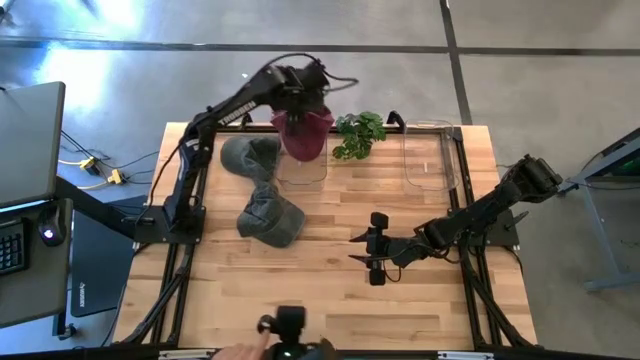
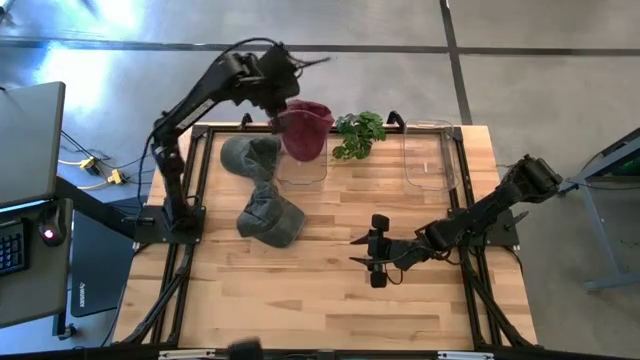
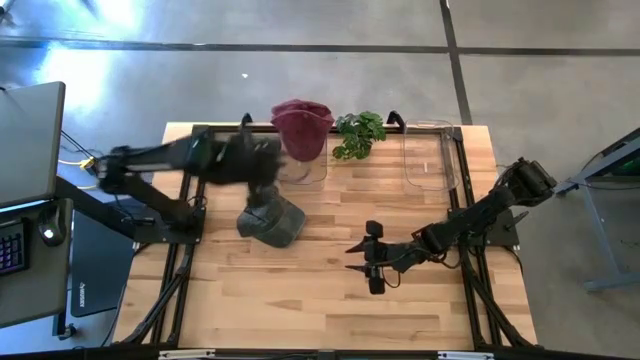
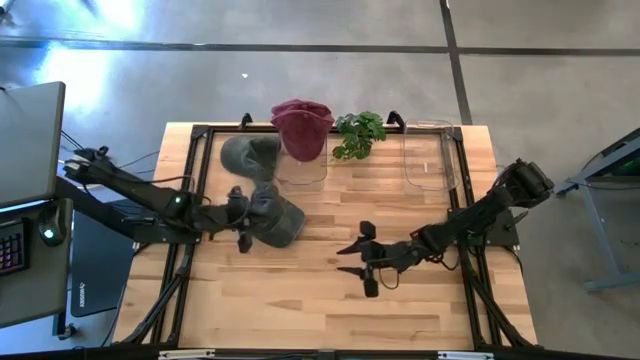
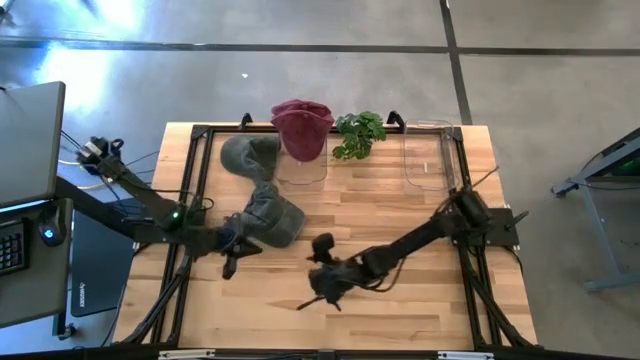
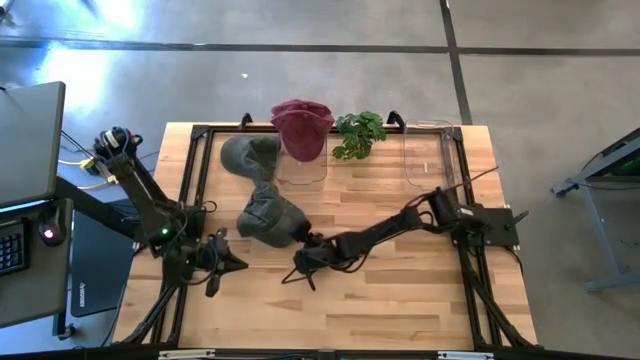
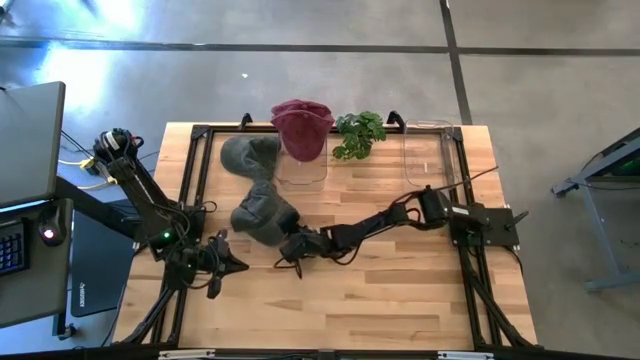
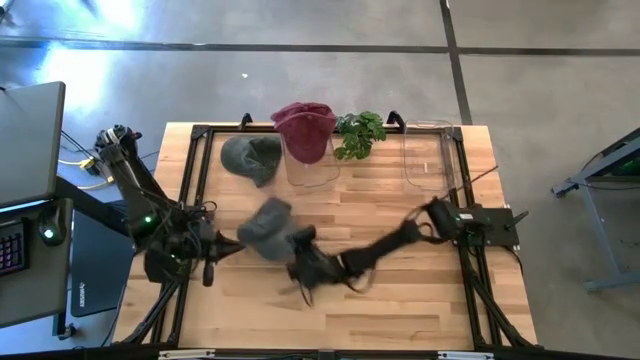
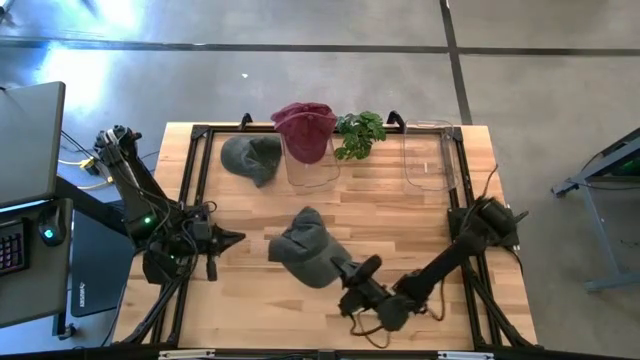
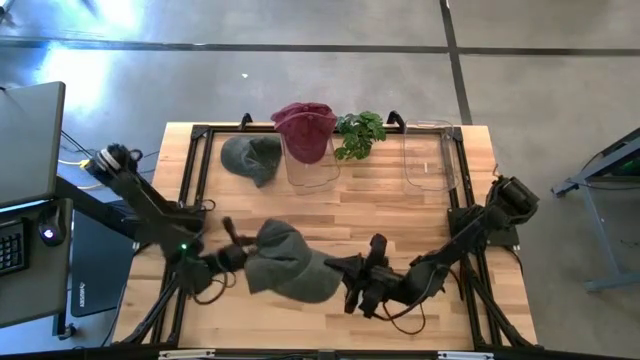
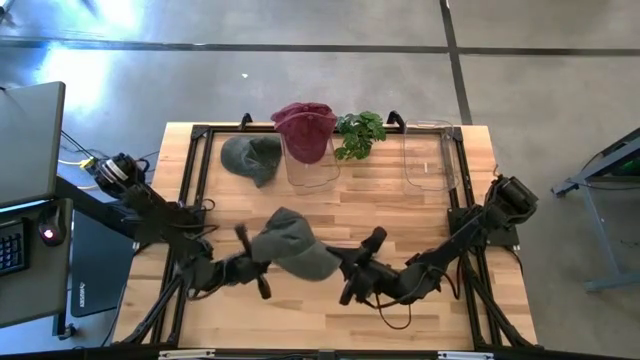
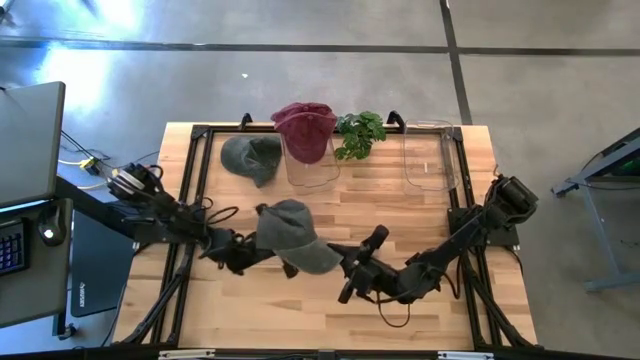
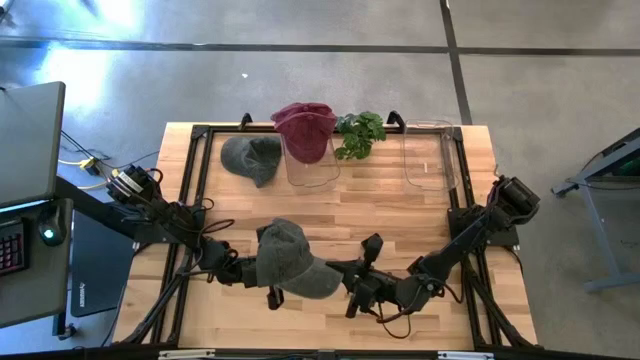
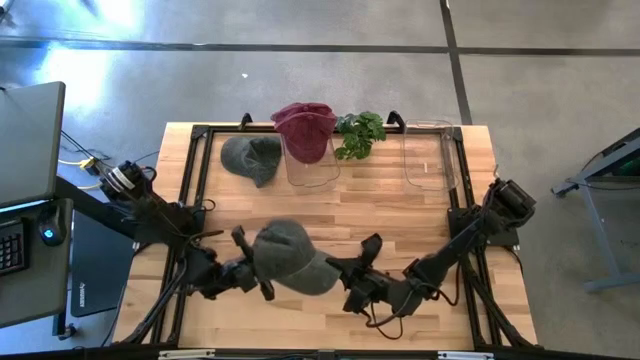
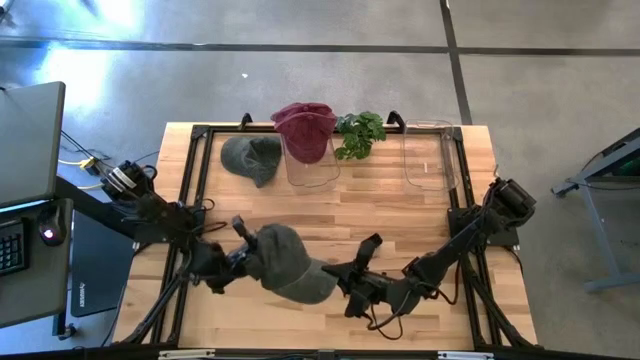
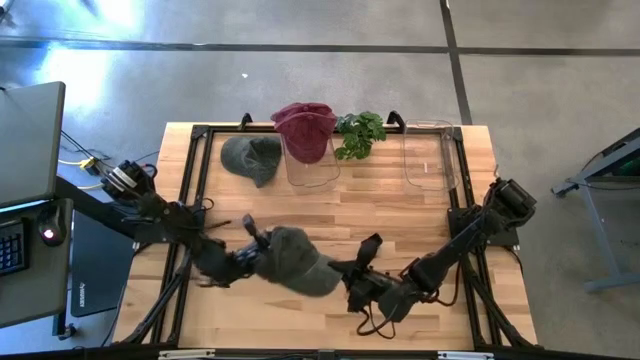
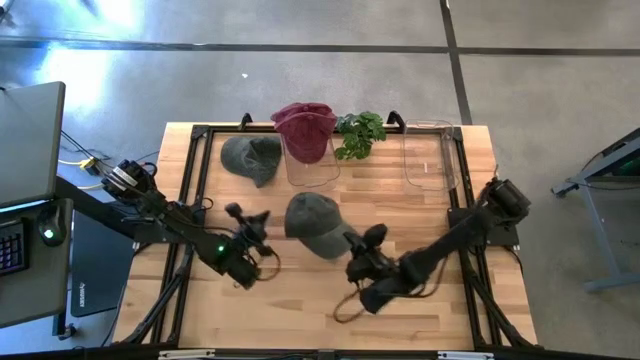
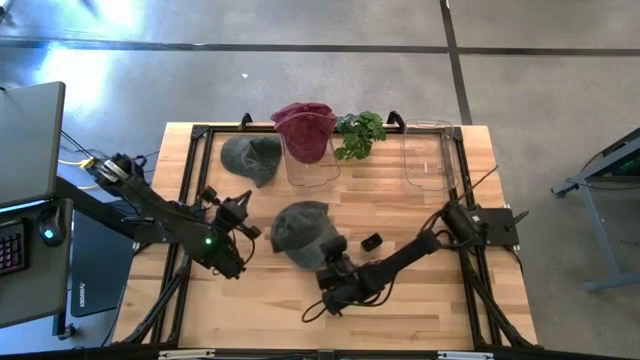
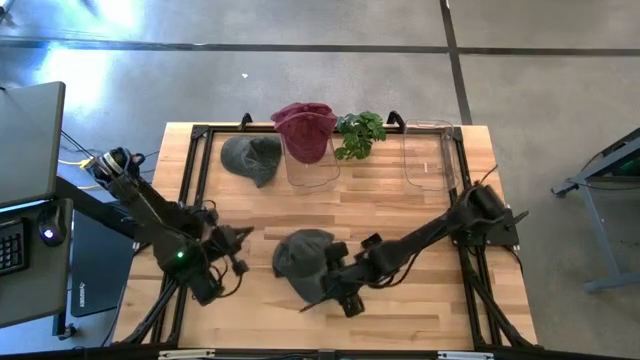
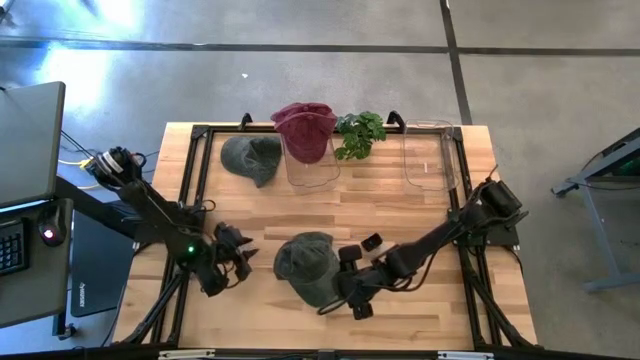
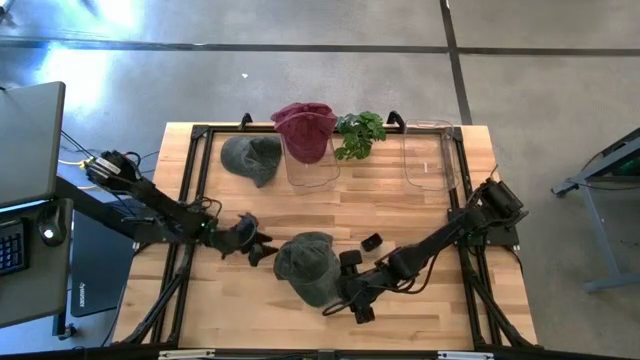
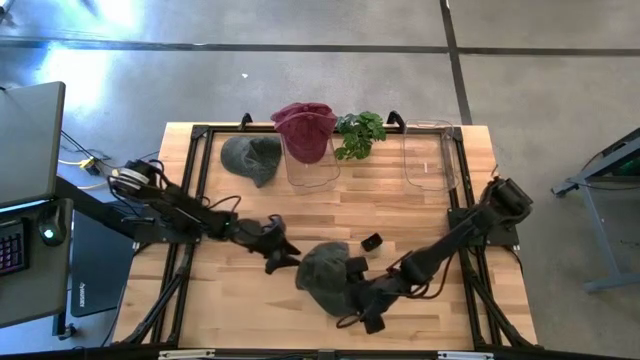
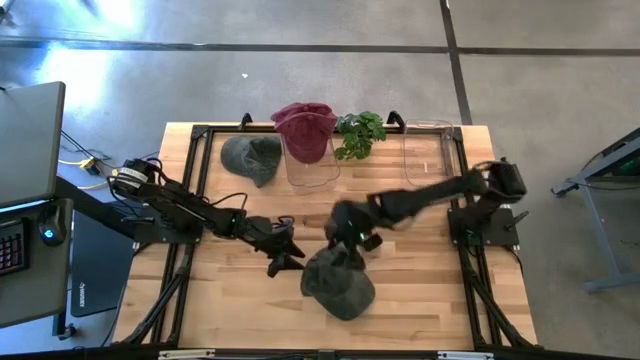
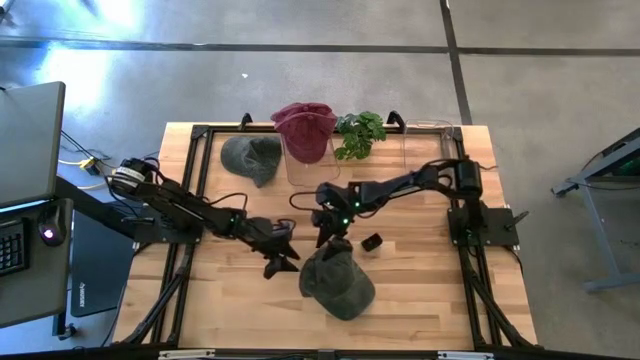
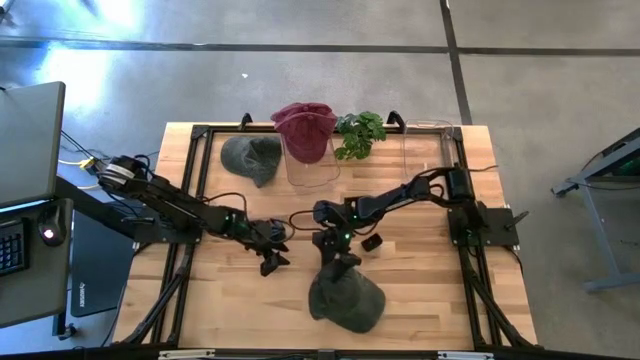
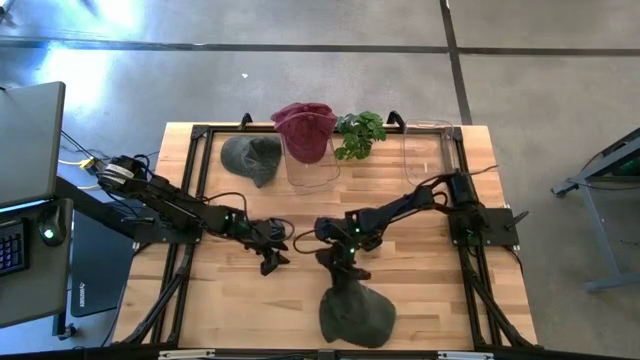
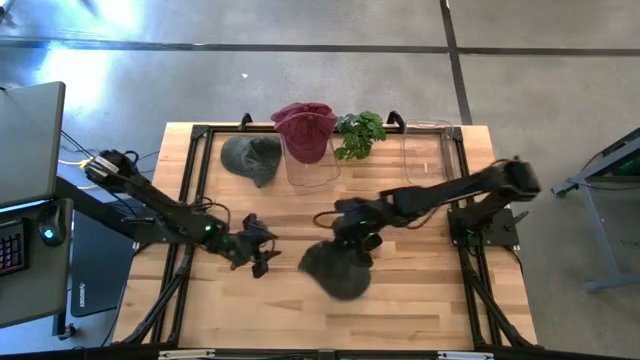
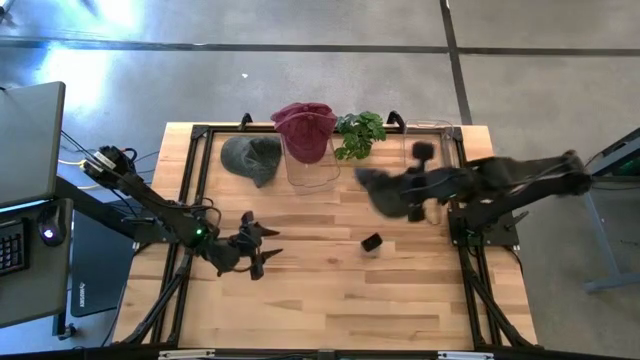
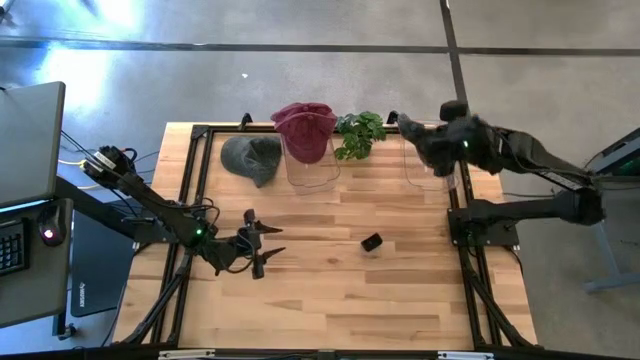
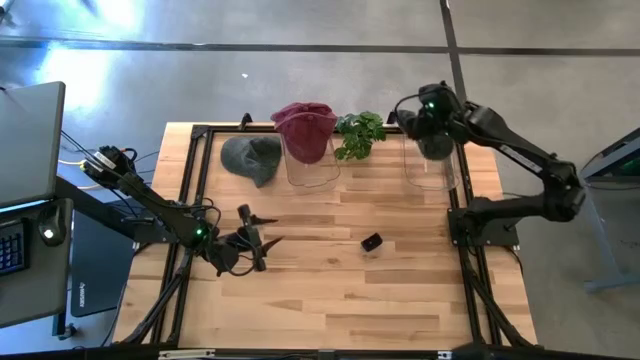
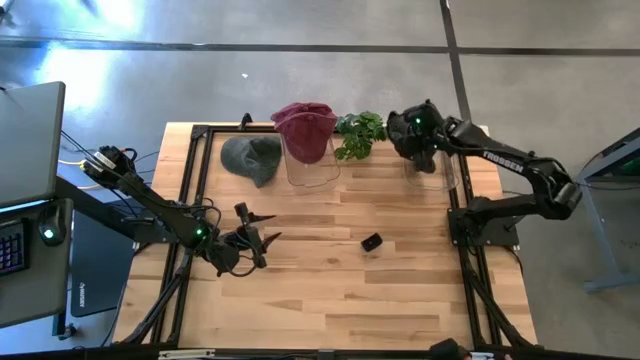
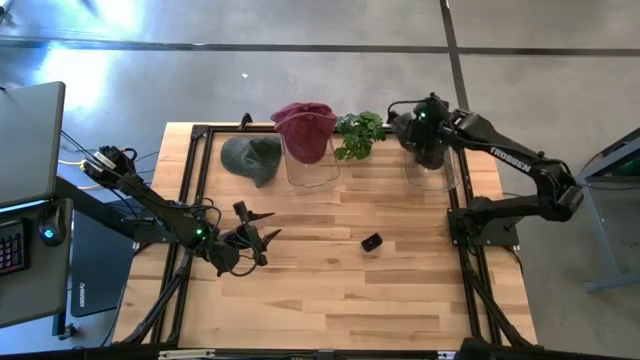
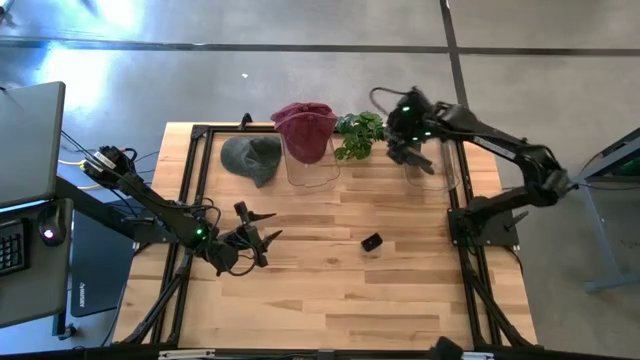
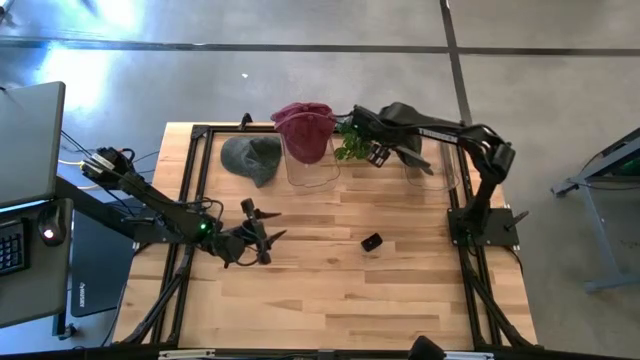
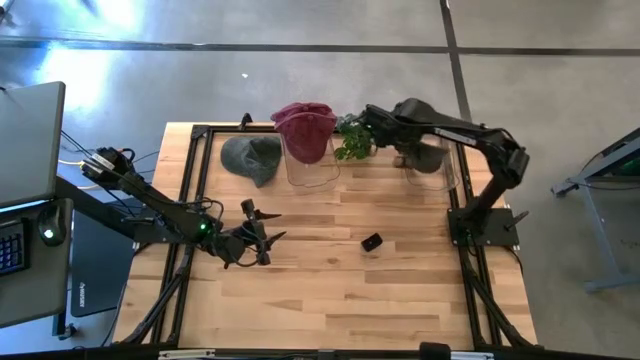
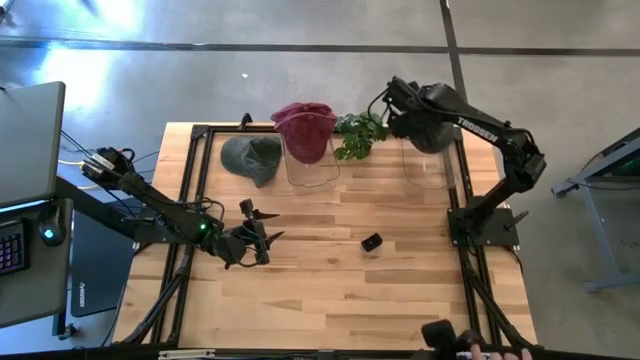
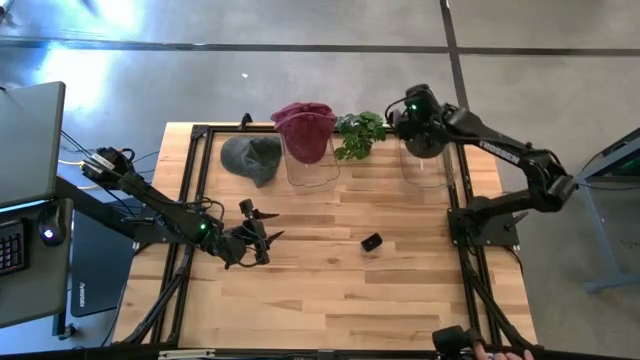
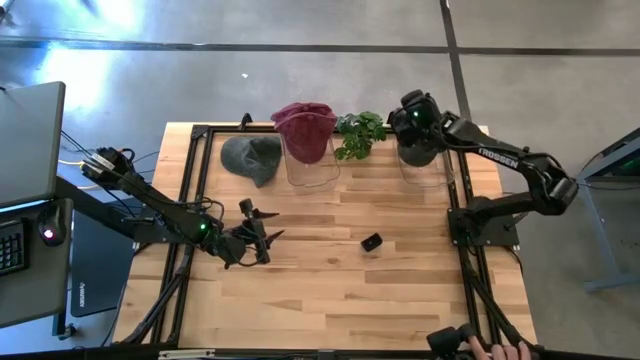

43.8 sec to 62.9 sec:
Task: Pick & Place hat
Put the bottom black cap into the right transparent bin

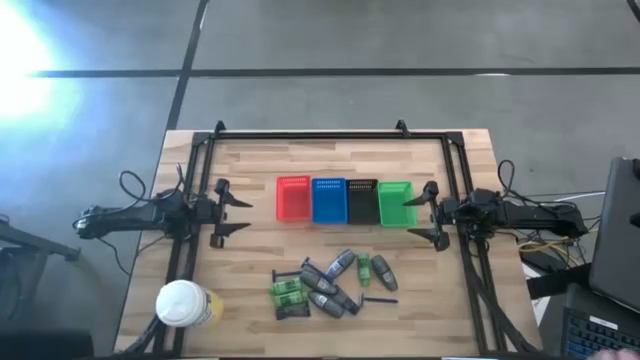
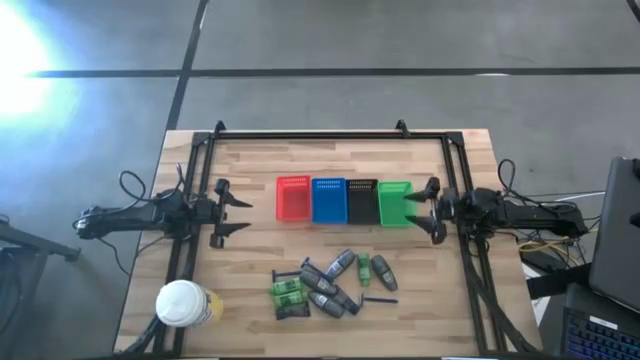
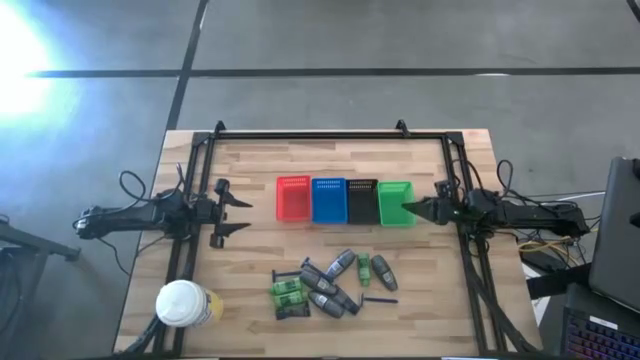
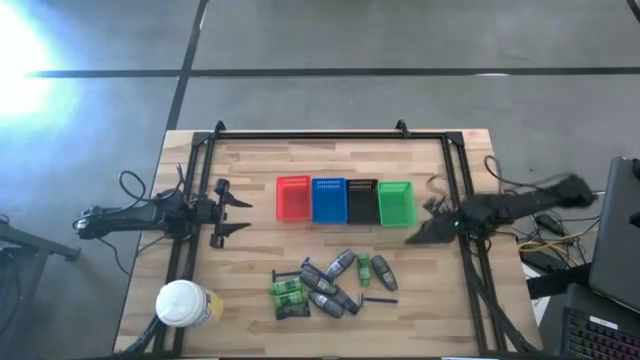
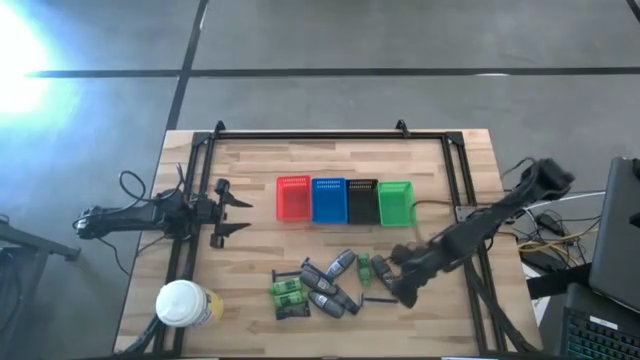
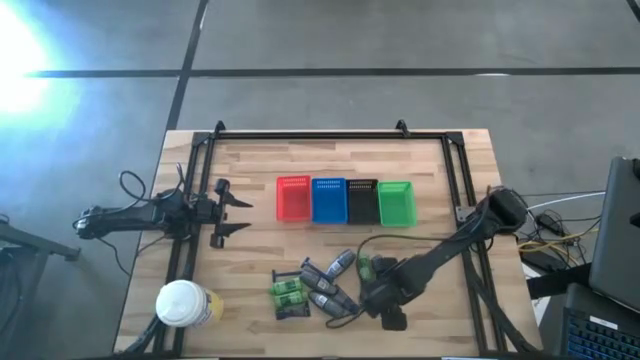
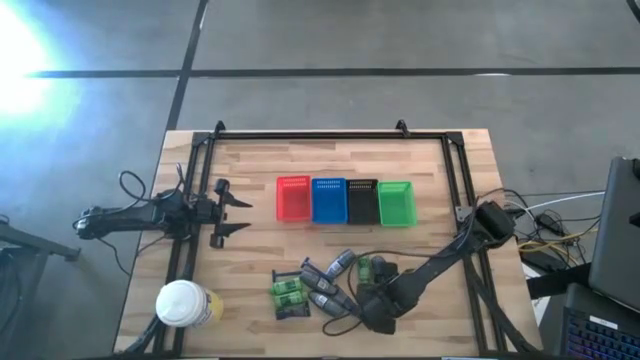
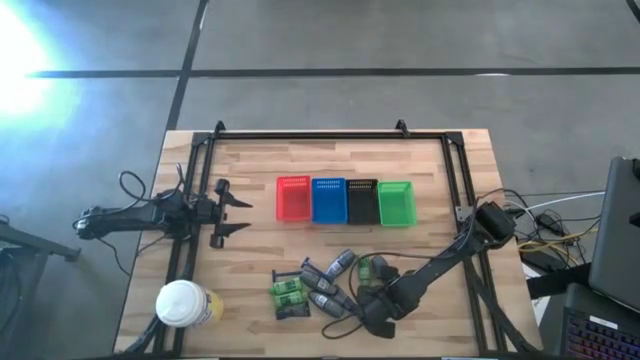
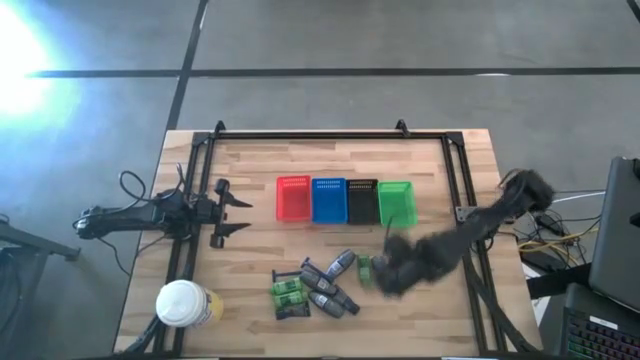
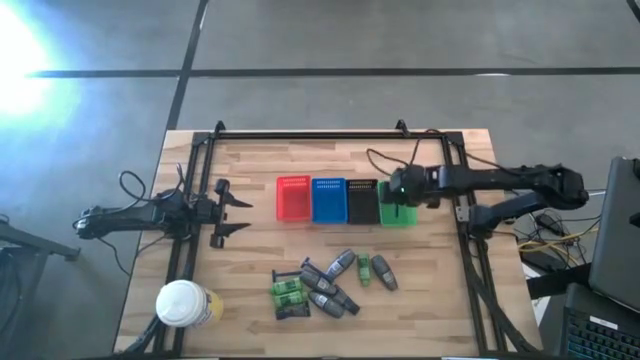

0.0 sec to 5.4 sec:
Task: Pick & Place Travel size toiletries
Put the blue razor into the green bin
